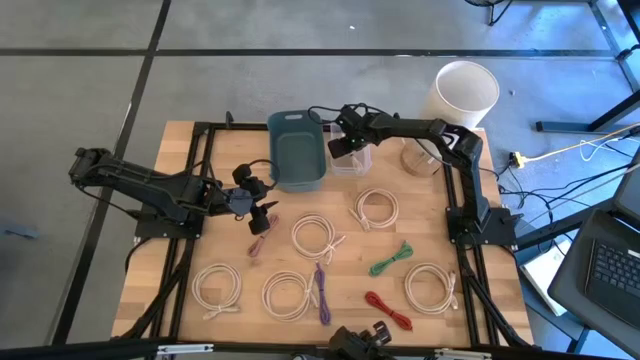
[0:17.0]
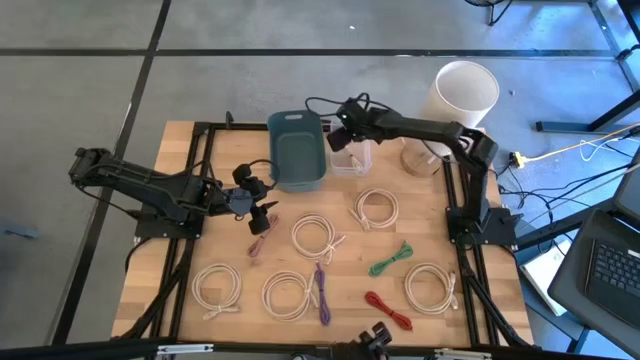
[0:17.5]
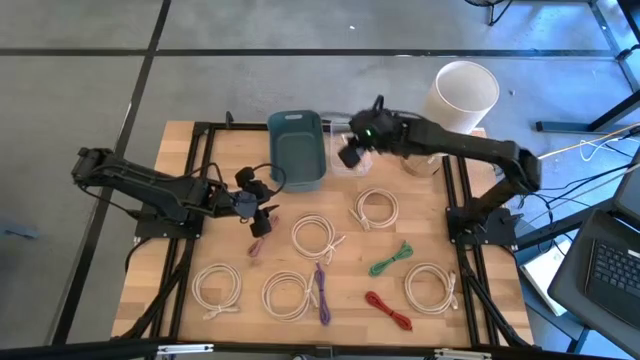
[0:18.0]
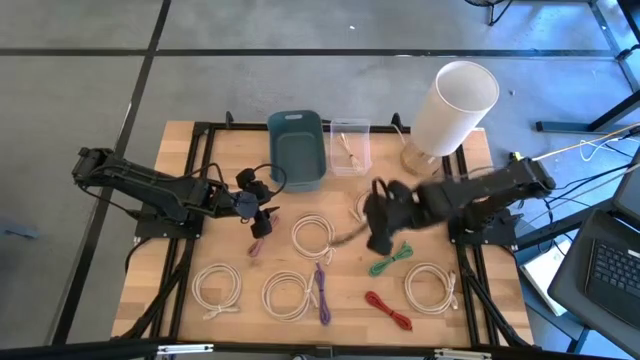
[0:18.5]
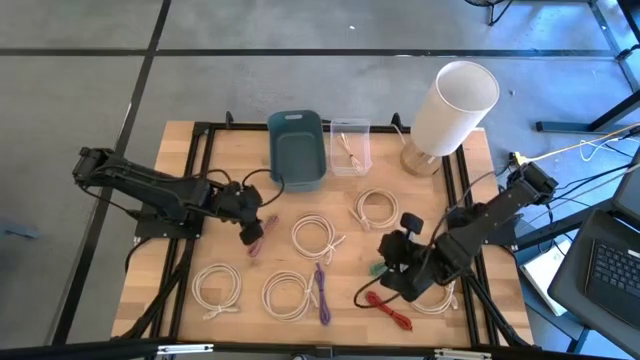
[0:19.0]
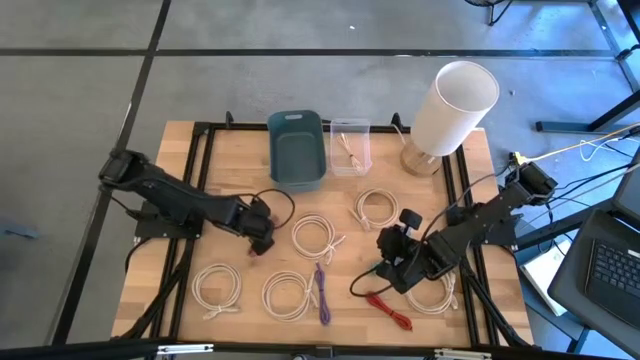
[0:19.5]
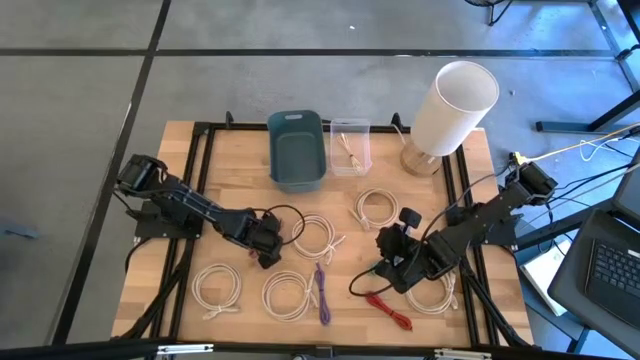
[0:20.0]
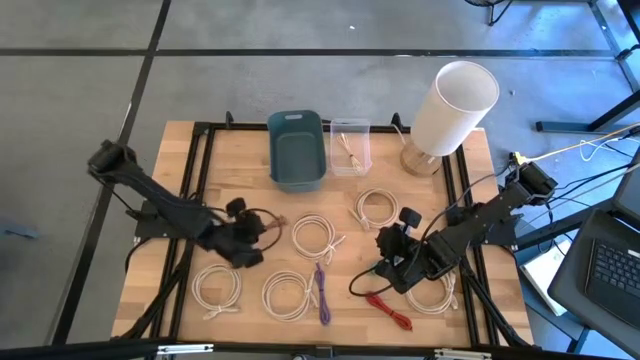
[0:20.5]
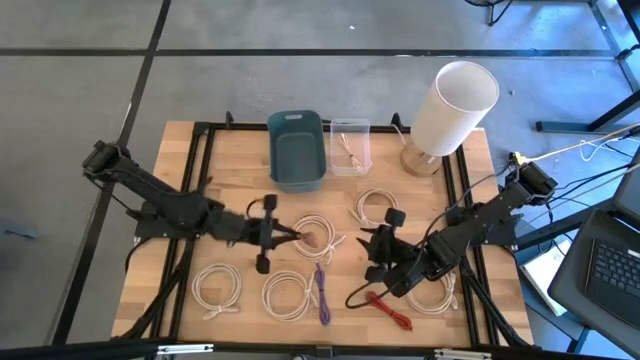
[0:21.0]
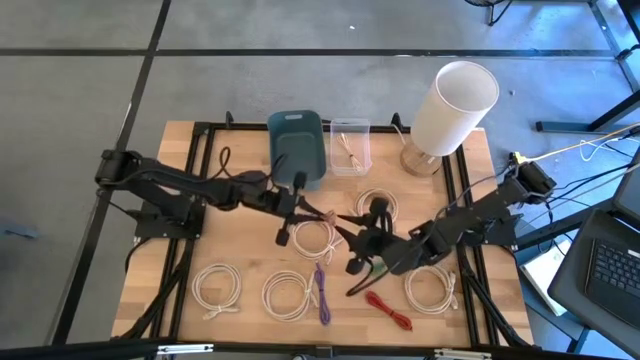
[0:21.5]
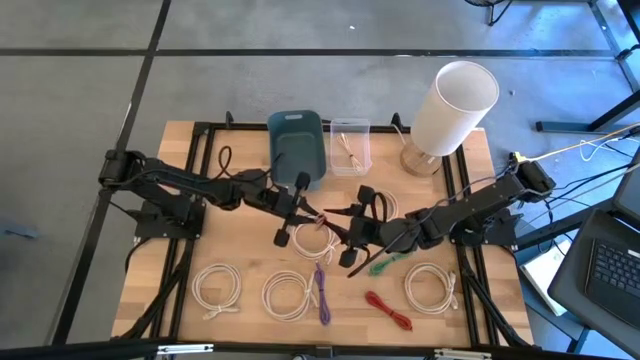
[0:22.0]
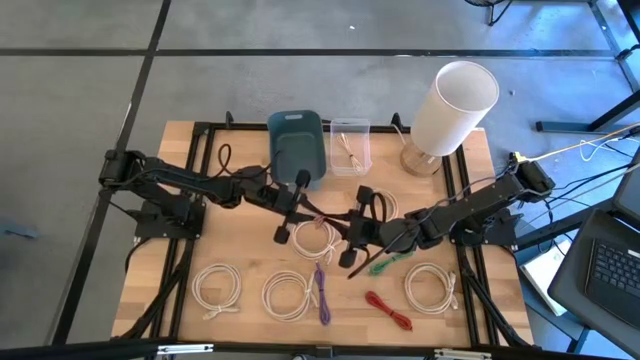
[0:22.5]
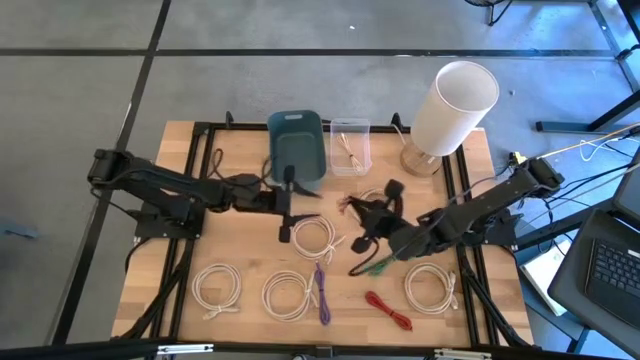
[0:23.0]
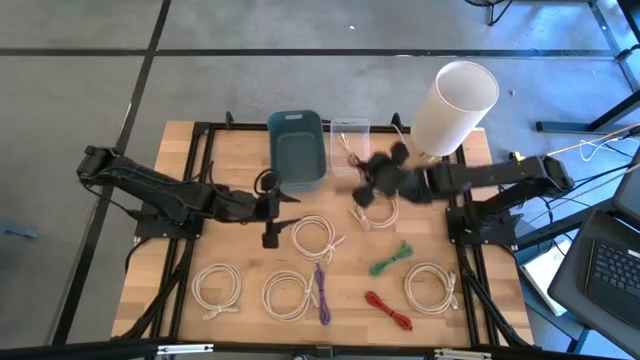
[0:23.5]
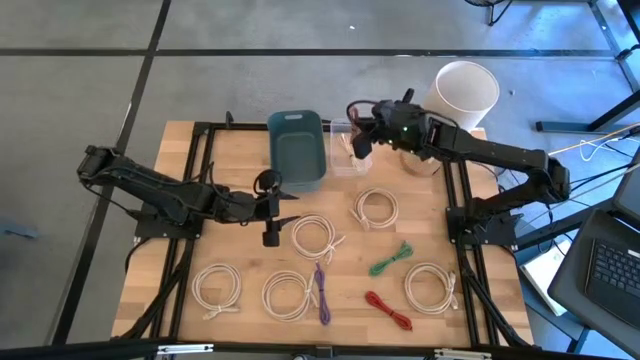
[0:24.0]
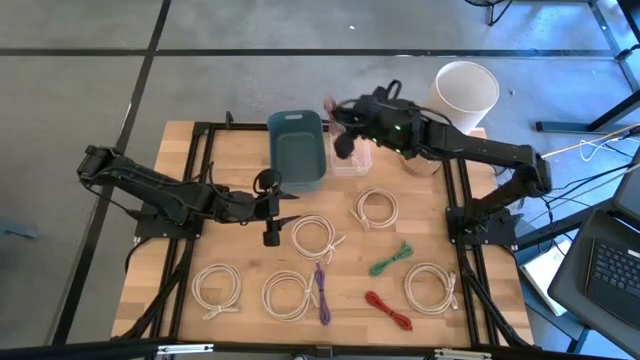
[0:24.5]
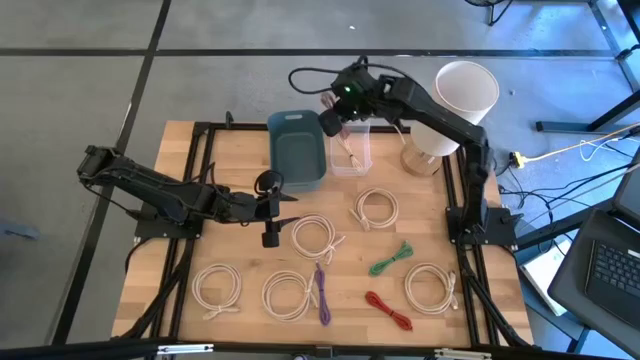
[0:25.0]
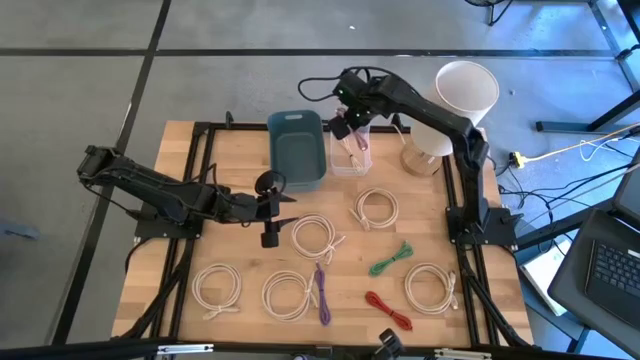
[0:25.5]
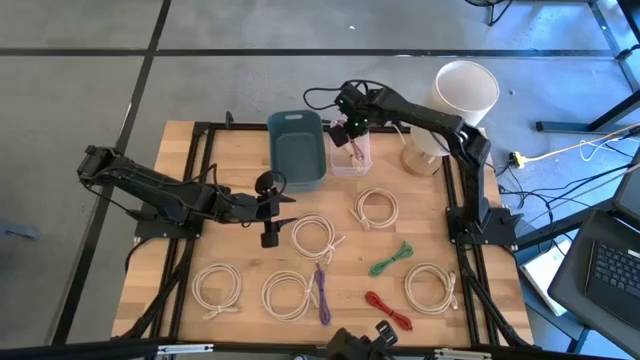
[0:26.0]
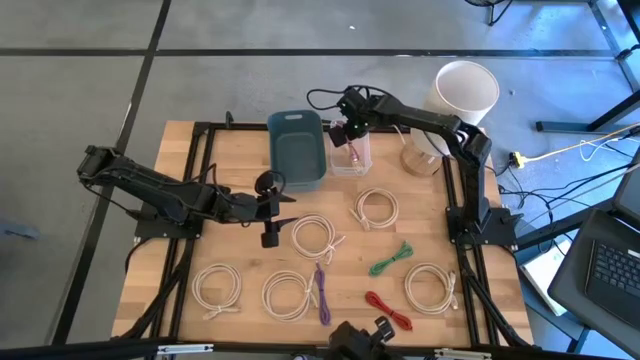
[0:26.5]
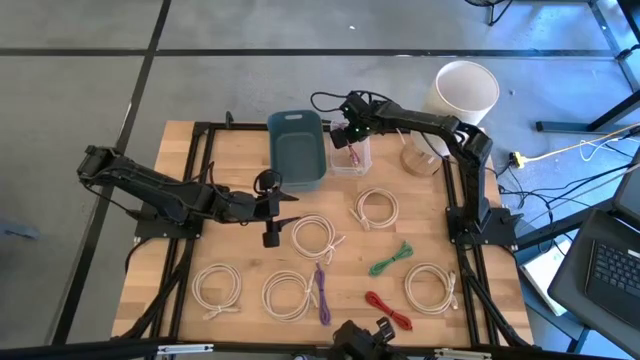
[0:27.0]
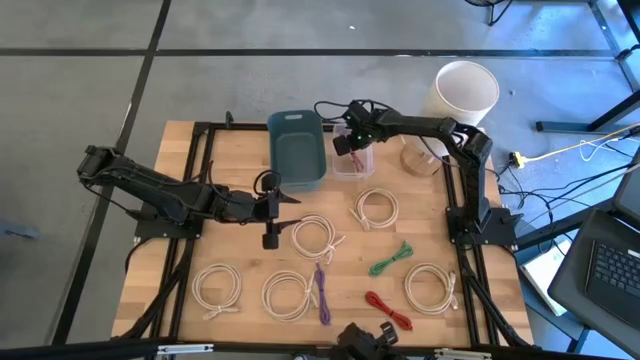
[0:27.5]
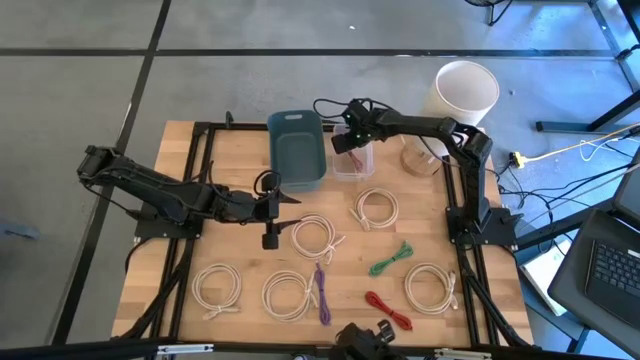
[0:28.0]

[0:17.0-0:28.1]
Put the pink charger cable into the transparent bin

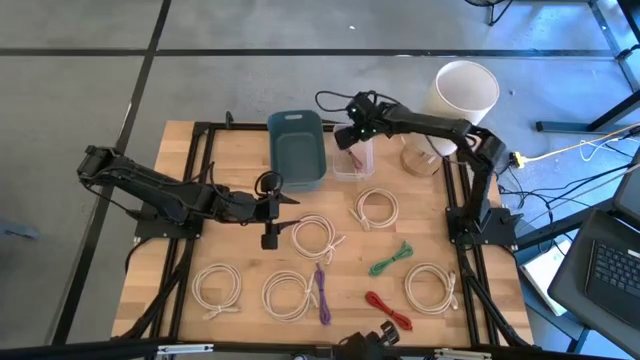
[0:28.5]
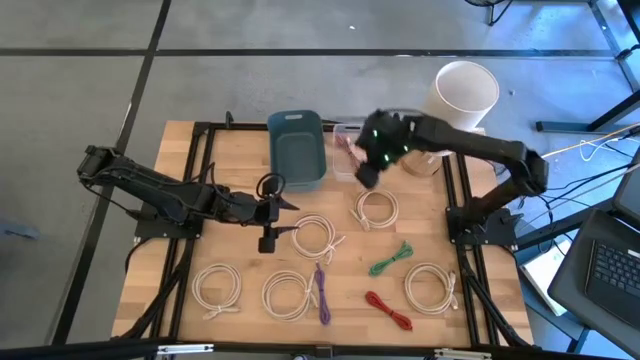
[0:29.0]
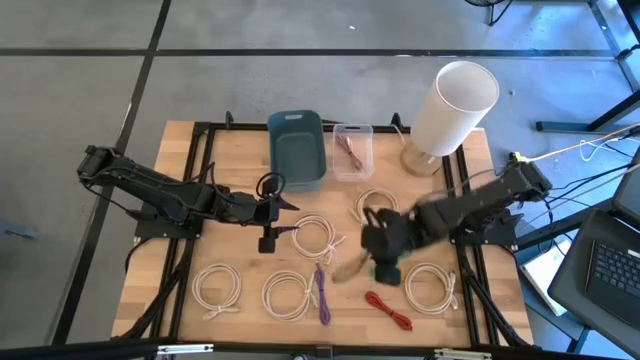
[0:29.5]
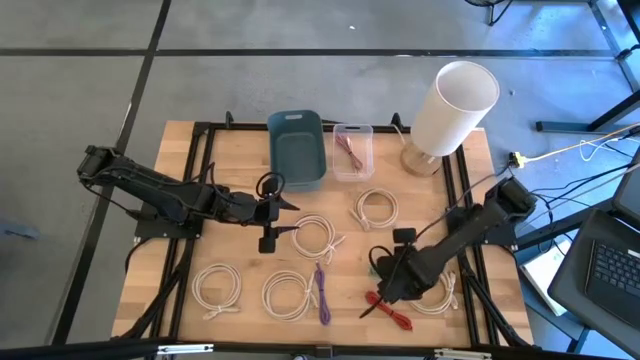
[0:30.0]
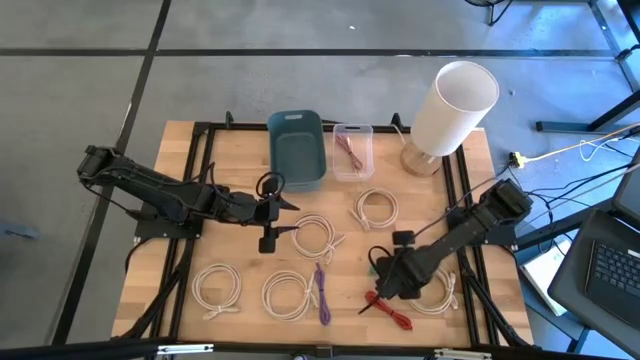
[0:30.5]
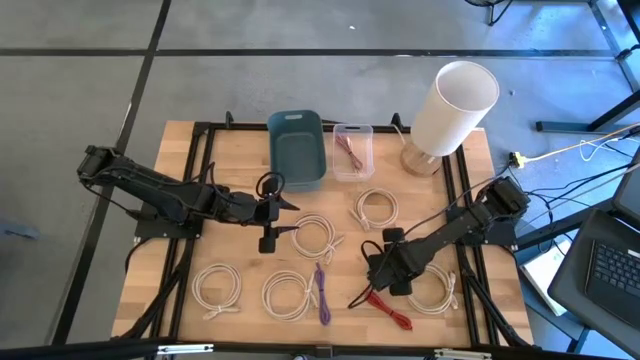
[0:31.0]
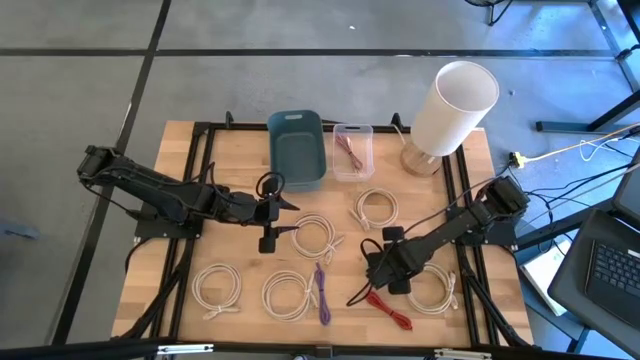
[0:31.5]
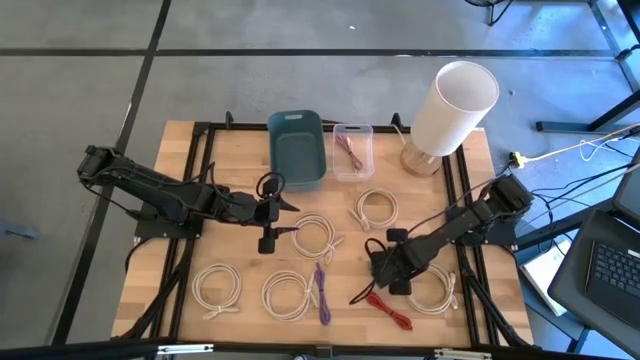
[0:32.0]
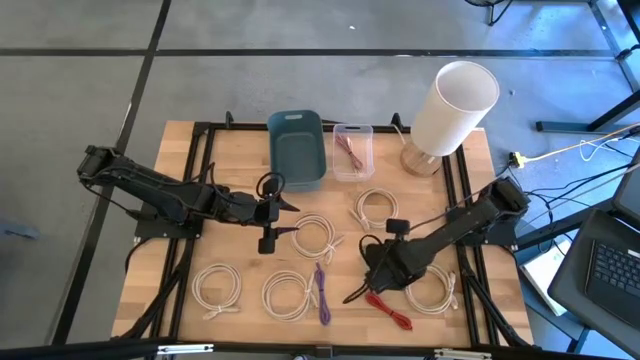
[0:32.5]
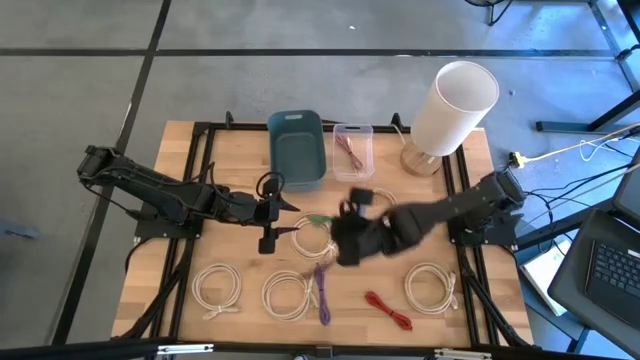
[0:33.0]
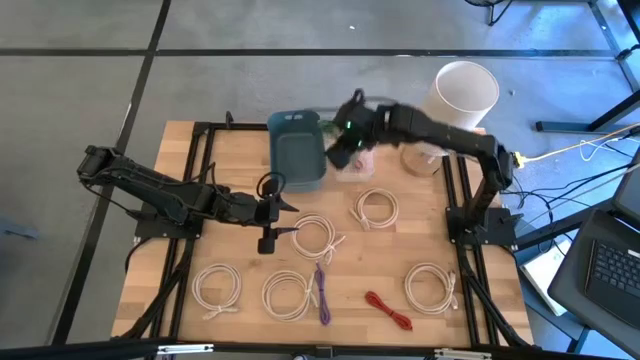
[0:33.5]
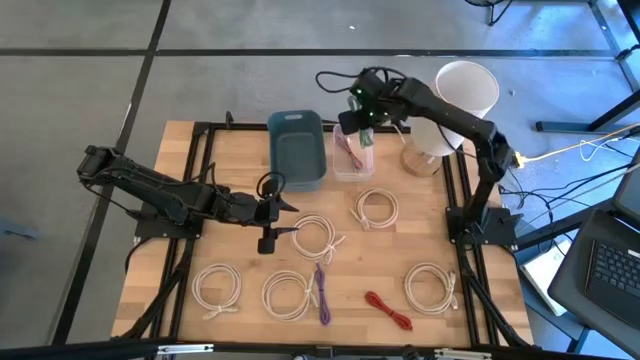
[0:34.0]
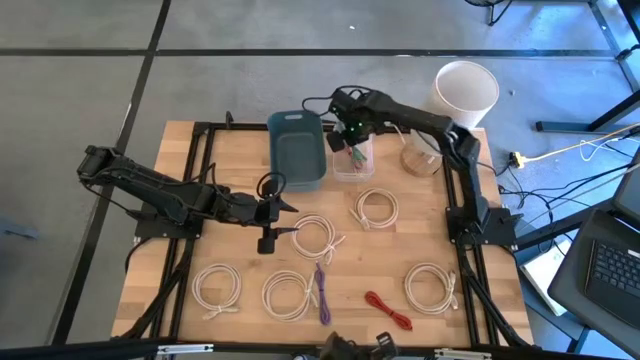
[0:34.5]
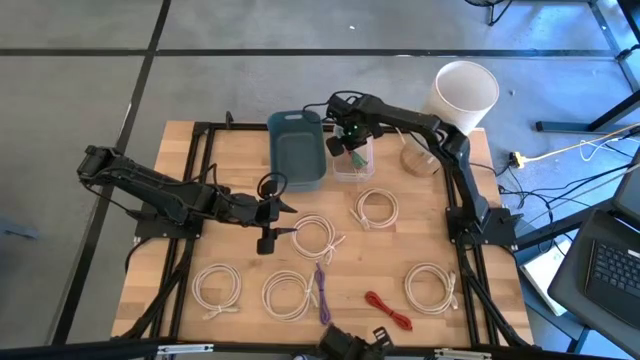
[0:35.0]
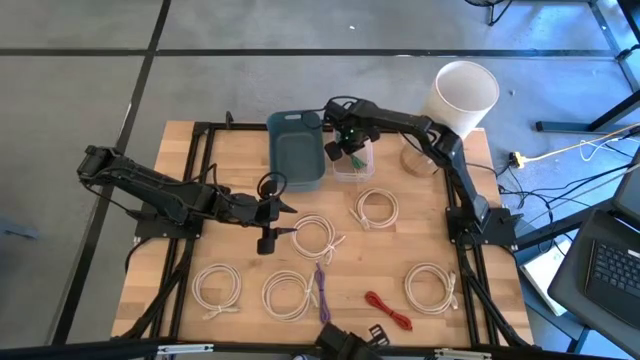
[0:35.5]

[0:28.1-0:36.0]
Put the green charger cable into the transparent bin

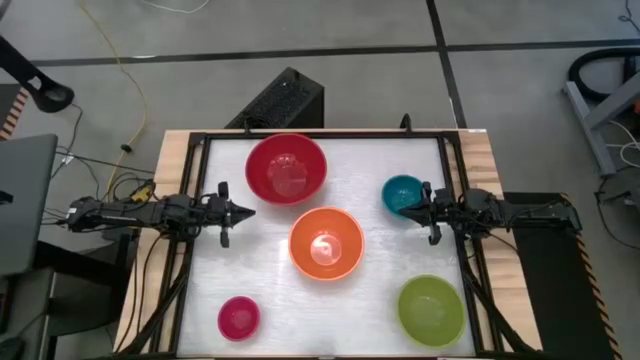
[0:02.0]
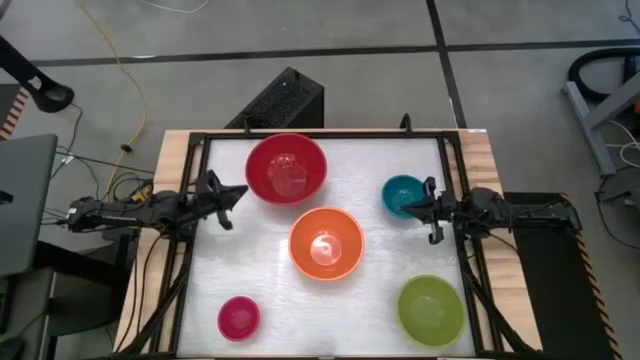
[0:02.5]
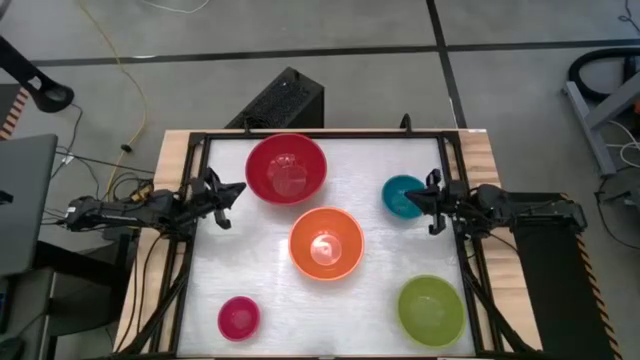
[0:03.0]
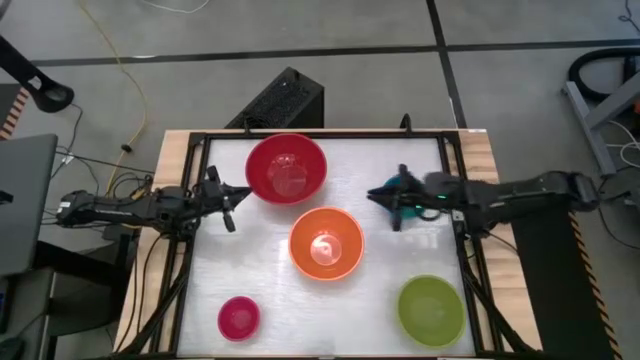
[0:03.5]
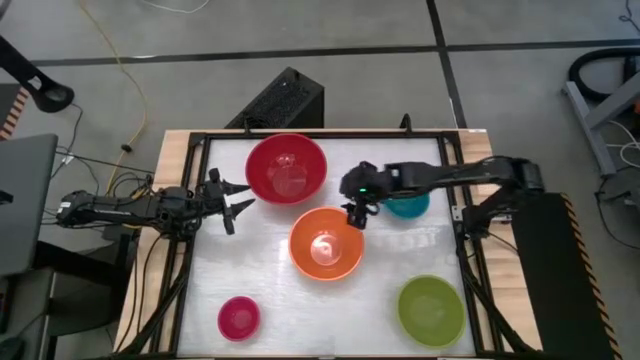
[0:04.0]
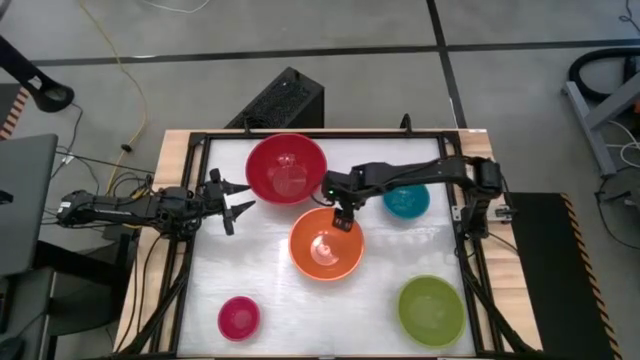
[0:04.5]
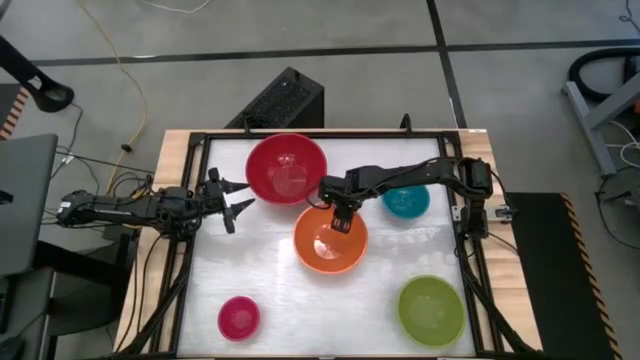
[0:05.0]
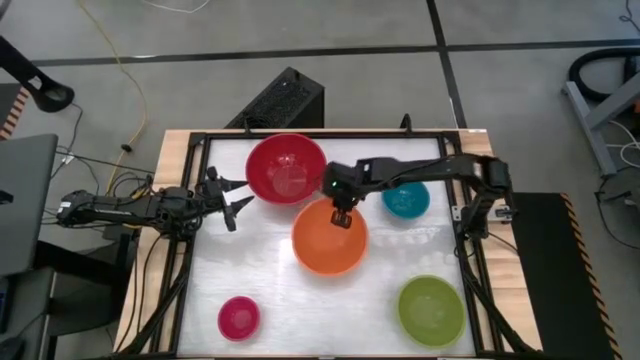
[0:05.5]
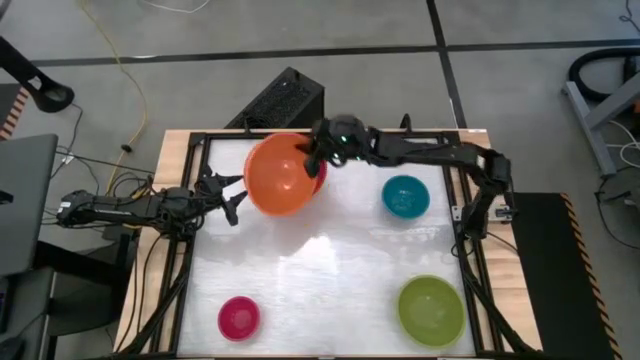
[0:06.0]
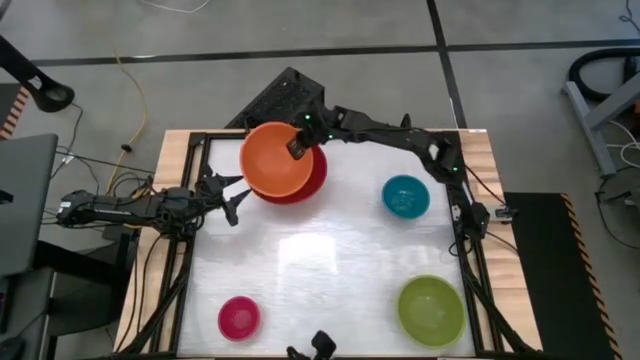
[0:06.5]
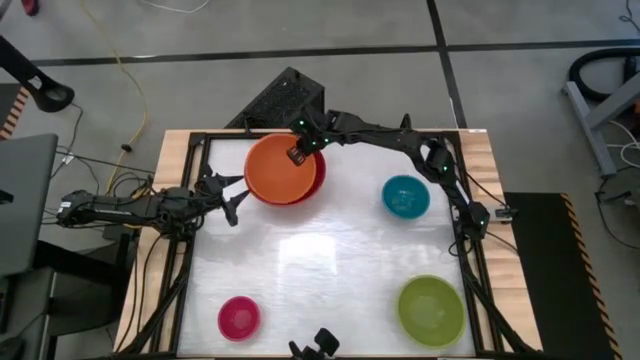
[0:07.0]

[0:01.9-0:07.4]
Stack the orange bowl on top of the red bowl
